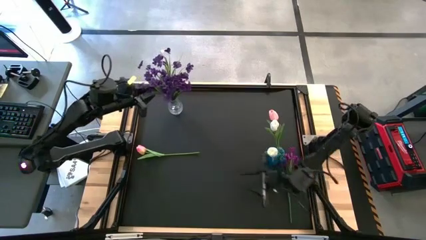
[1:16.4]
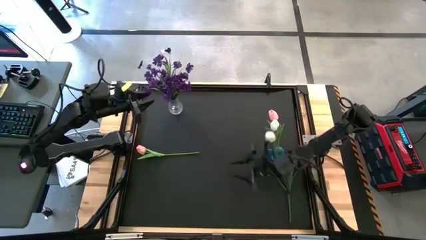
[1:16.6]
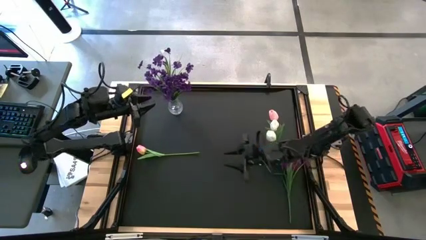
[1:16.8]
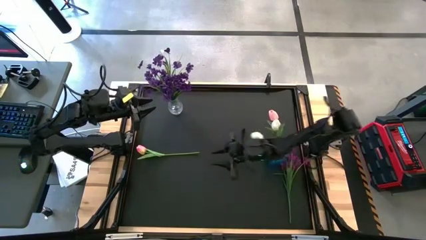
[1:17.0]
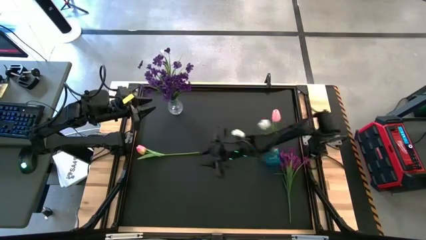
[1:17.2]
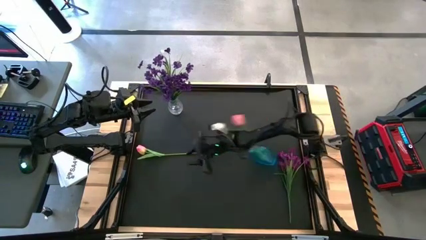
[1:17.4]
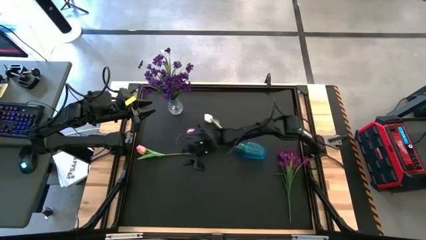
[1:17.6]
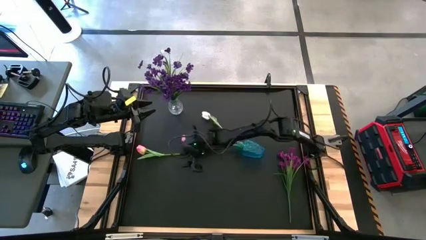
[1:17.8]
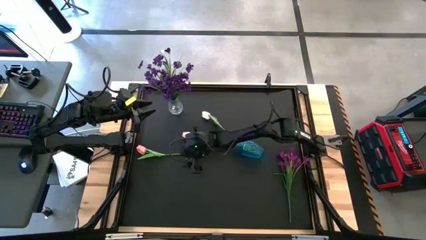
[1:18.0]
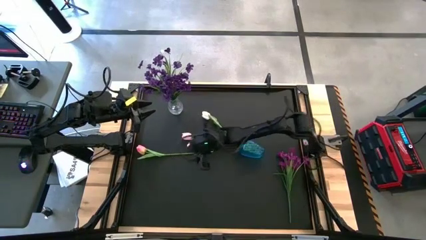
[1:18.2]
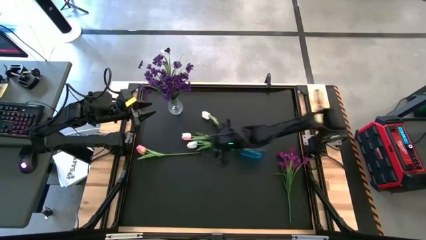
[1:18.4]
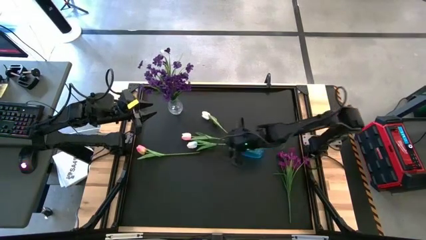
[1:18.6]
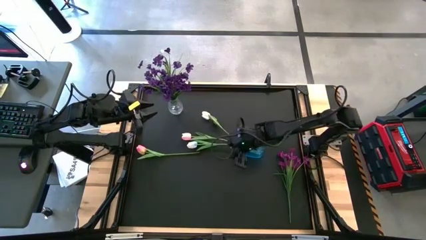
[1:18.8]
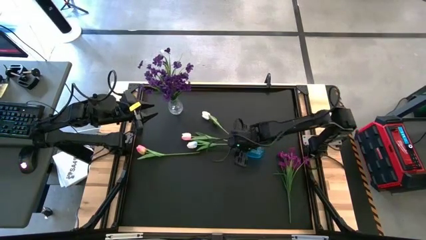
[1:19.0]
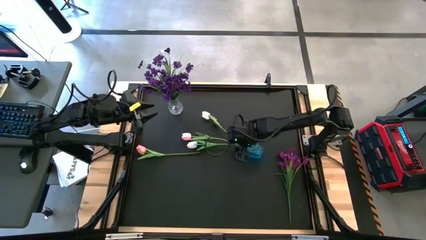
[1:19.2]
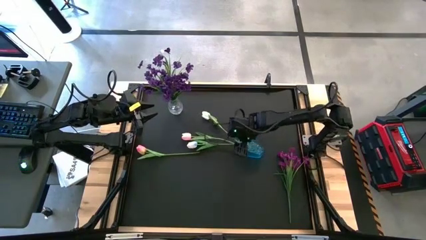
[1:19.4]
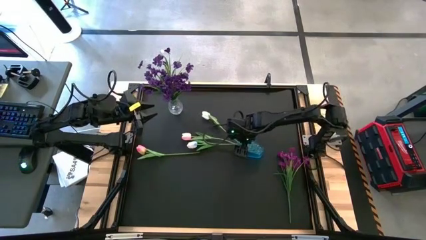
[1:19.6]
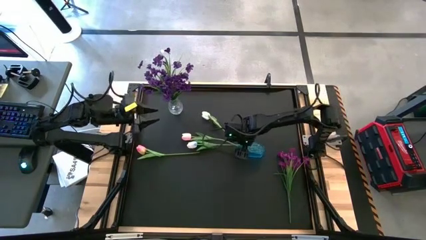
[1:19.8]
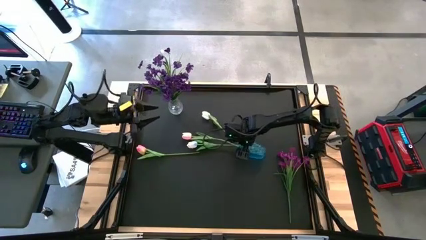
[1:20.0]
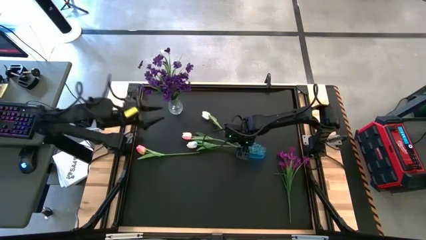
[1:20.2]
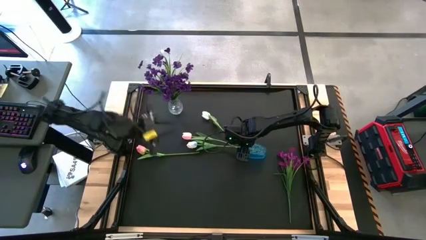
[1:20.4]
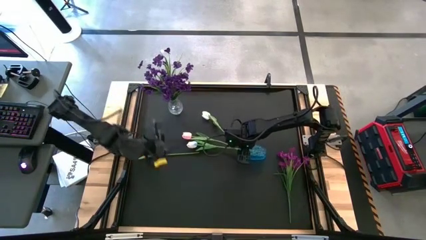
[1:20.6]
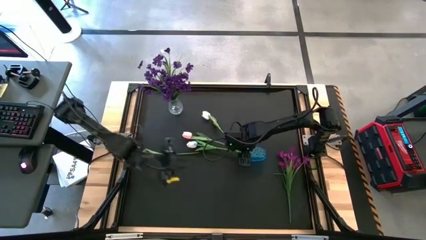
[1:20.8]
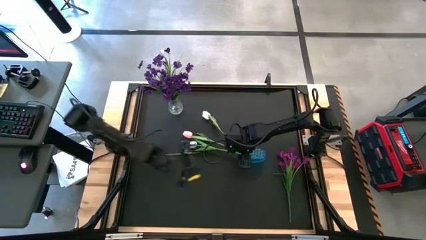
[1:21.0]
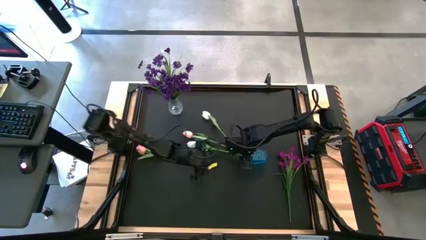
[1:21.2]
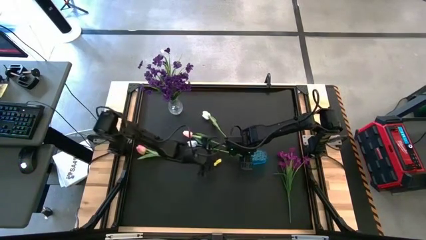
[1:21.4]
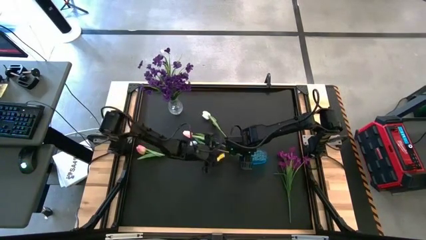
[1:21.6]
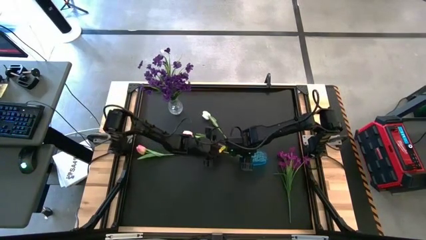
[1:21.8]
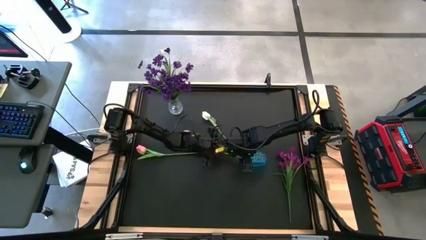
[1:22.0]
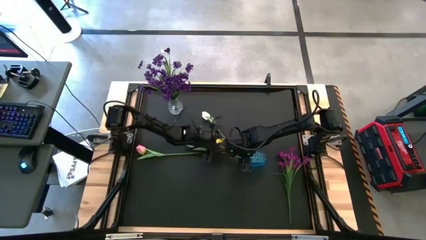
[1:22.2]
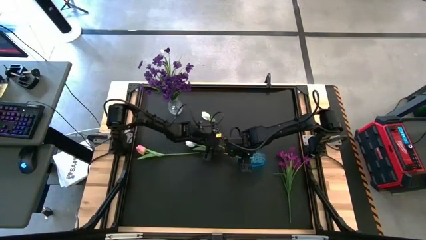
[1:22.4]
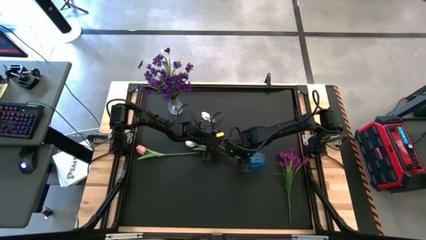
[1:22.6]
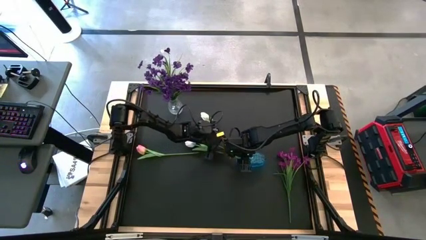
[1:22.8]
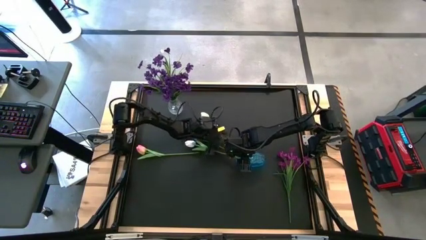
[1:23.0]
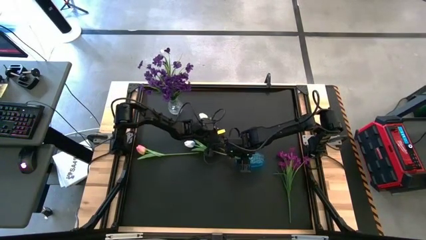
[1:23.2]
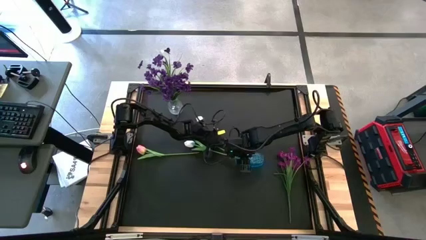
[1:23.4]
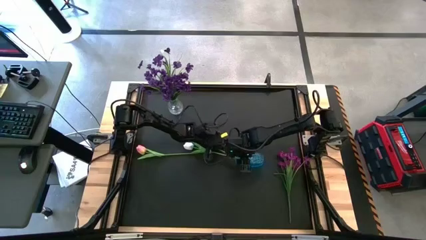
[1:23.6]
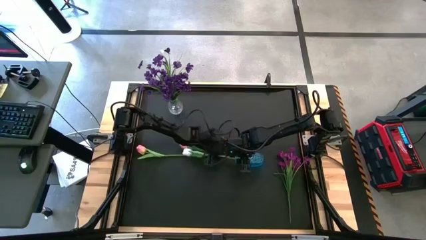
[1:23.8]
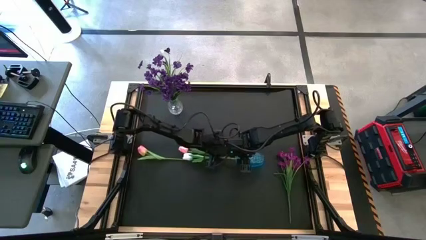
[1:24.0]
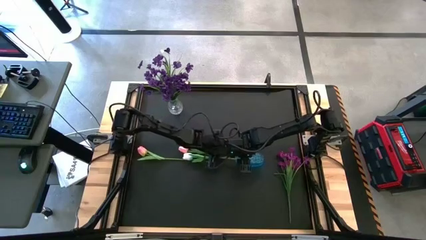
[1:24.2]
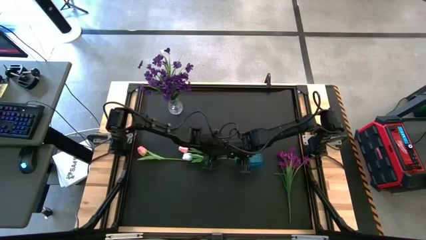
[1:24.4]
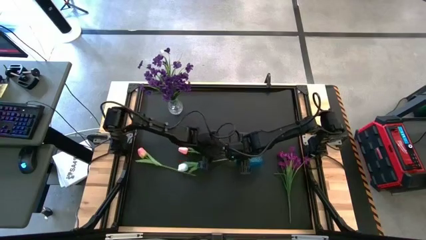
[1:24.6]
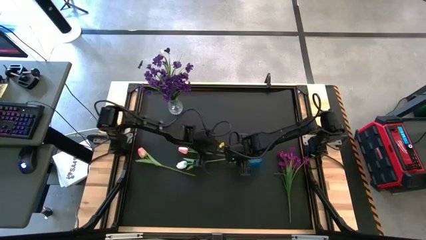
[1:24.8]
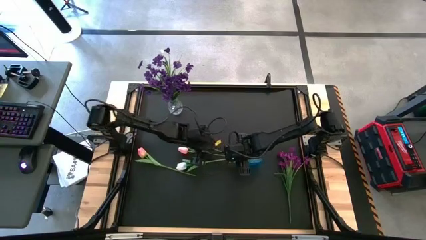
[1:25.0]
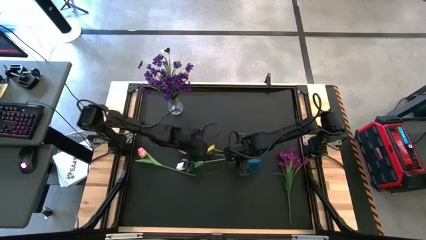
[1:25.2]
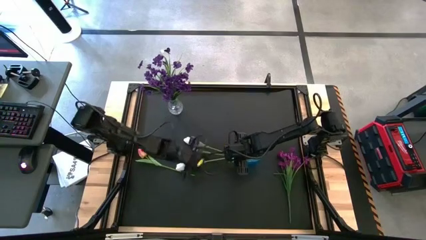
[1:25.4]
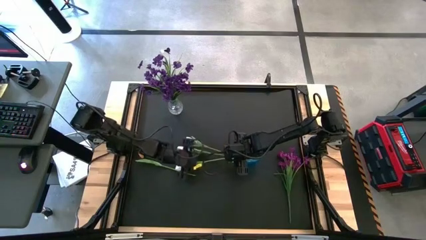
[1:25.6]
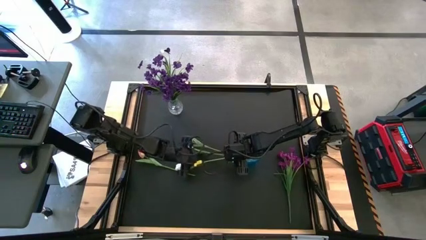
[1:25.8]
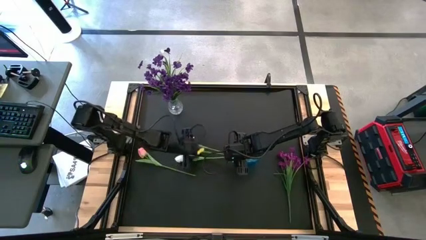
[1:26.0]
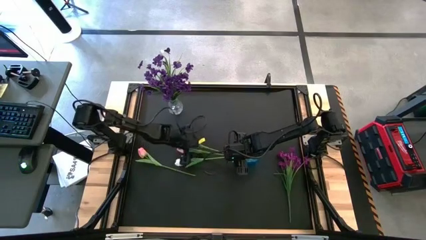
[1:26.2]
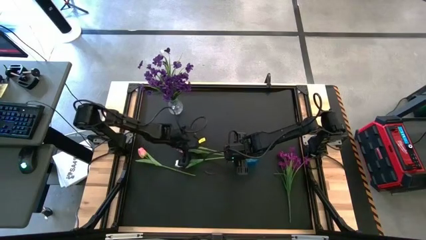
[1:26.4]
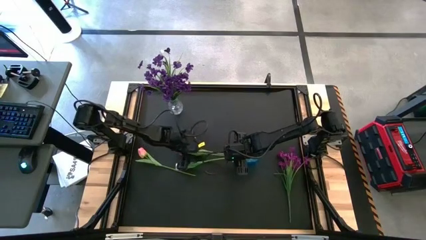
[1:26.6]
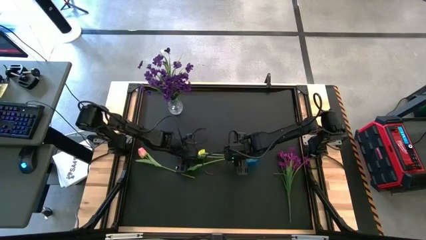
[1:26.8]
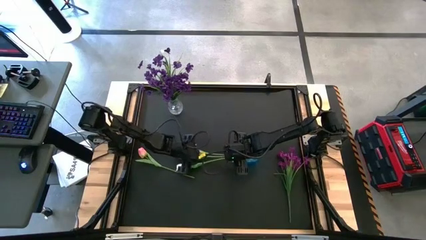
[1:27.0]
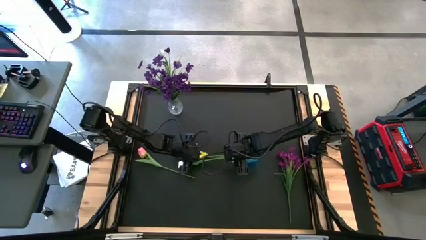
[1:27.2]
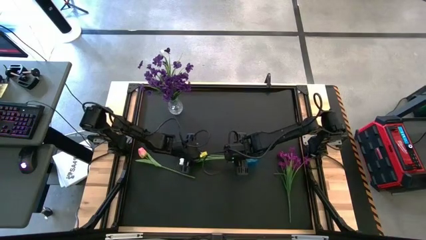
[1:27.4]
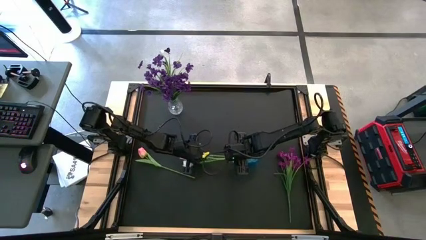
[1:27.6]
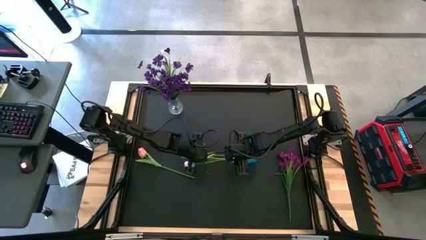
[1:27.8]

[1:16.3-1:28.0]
Task: Sort flowers into vase by color
Adjust the transparent blue vase

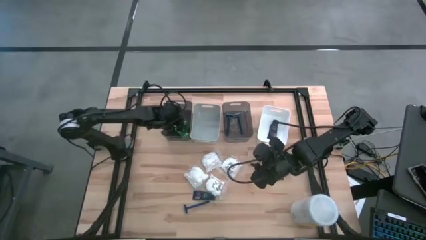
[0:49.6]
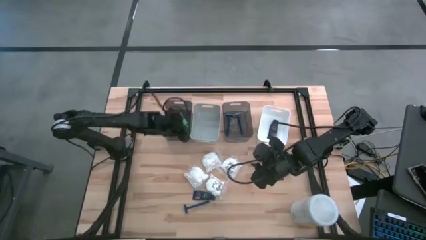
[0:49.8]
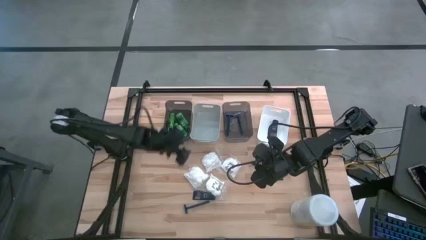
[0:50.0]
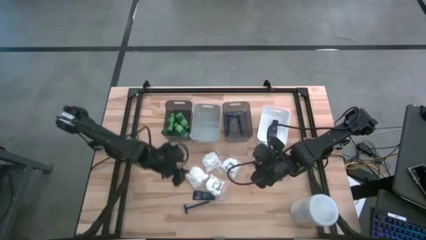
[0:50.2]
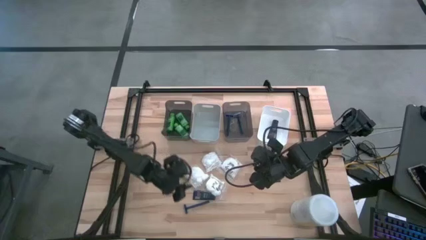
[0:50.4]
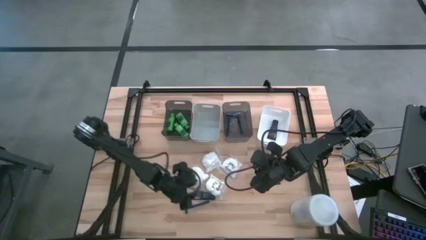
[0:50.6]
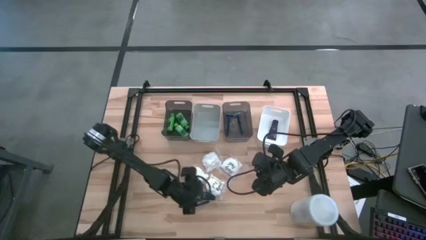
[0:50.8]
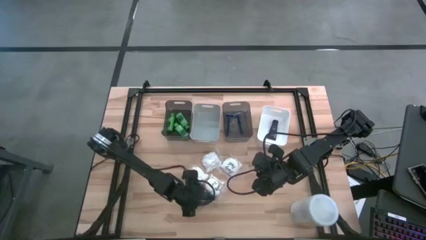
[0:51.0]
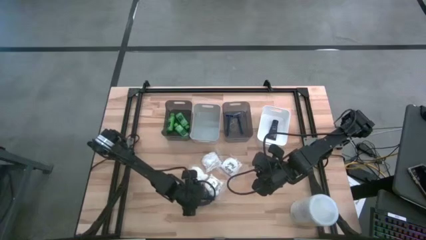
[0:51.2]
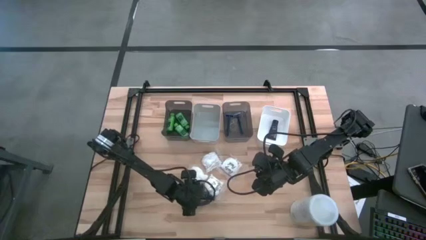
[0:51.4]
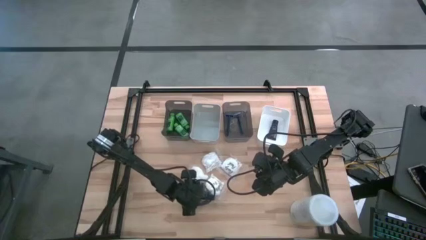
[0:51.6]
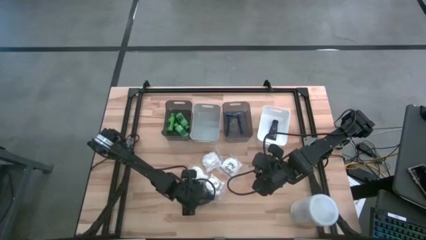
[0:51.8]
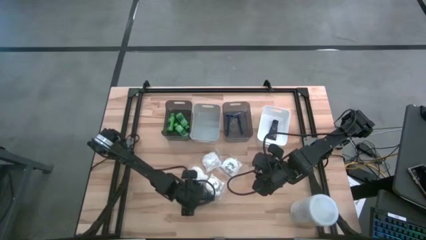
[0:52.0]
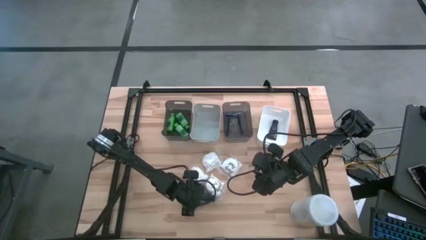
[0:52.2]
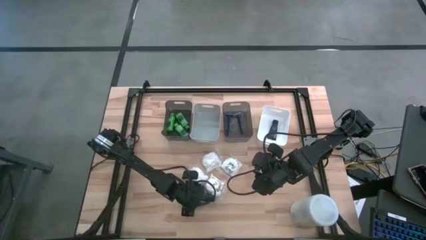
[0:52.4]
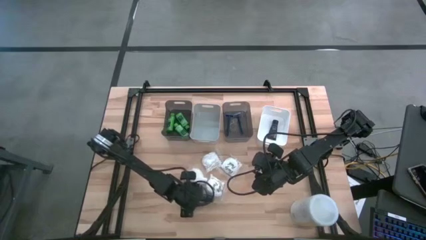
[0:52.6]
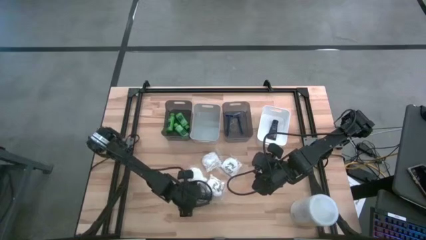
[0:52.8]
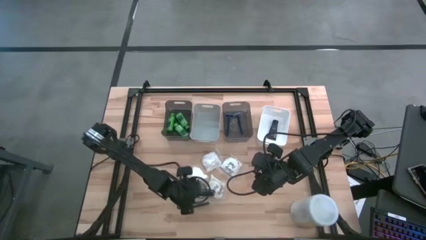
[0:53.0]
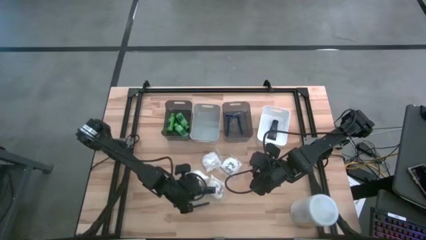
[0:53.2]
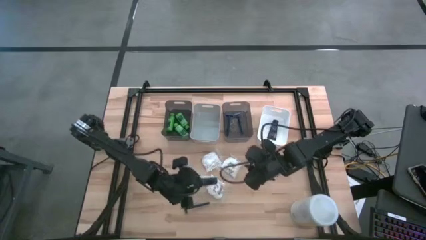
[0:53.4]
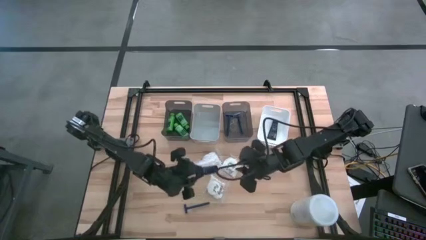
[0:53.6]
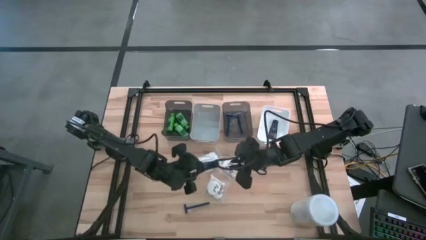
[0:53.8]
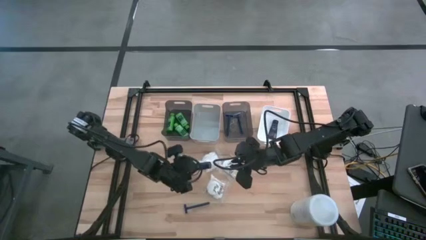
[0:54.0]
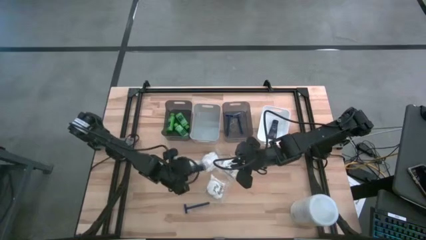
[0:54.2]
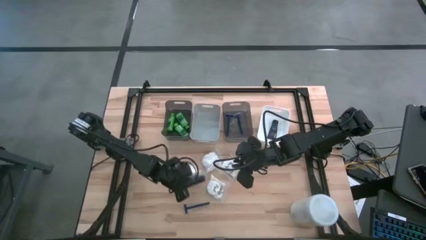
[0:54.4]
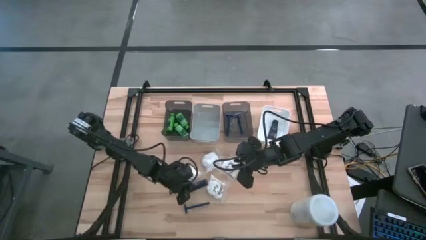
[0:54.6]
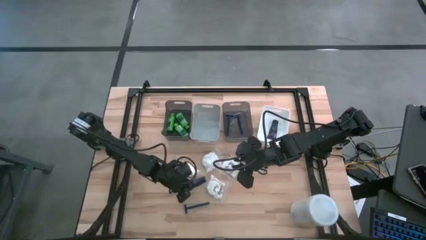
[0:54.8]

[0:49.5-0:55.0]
Task: Pick & Place Travel size toiletries
Put the blue shave cream into the white bin
